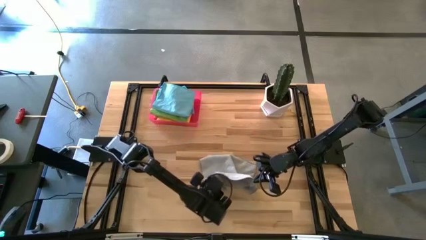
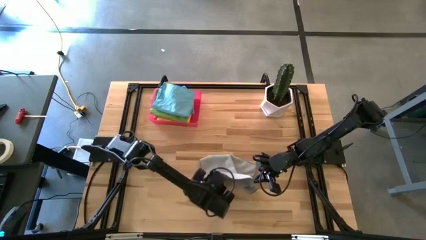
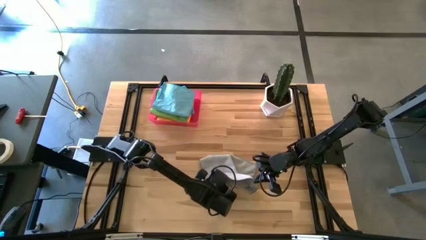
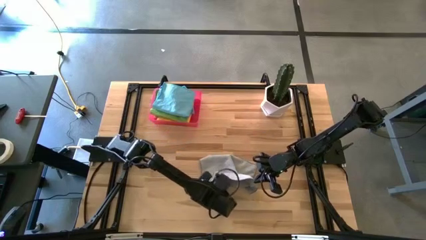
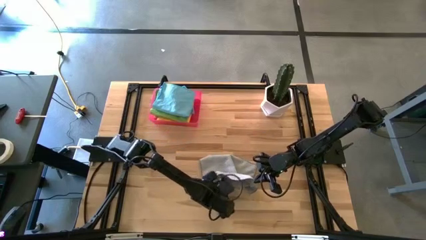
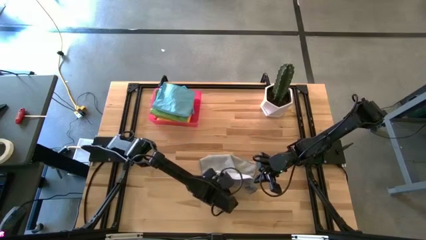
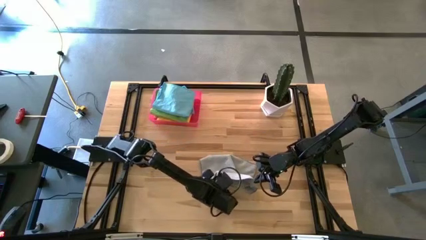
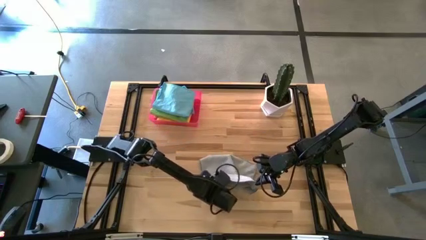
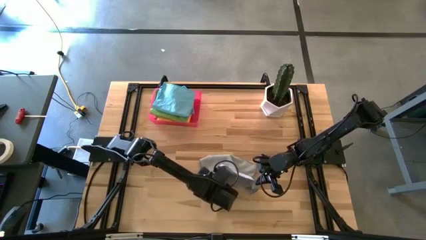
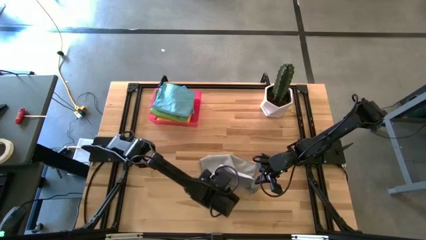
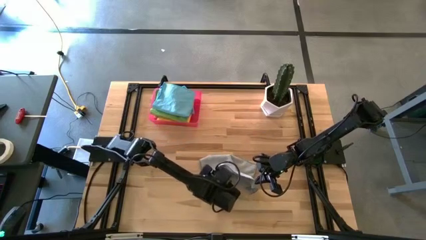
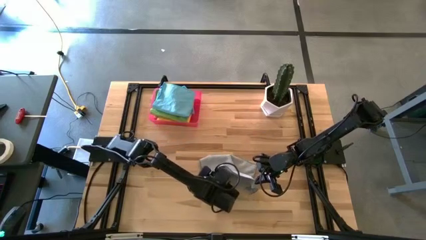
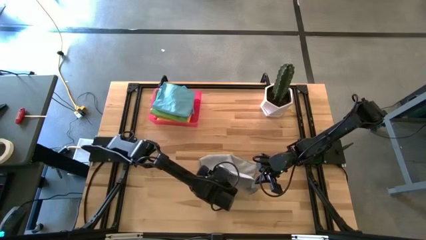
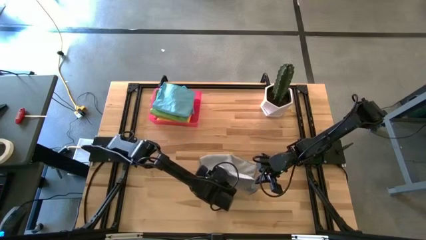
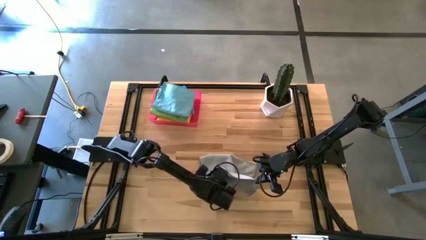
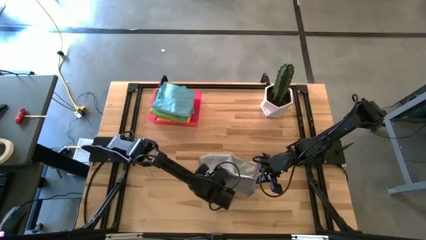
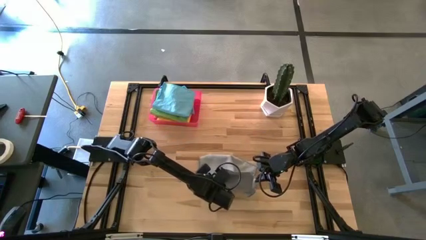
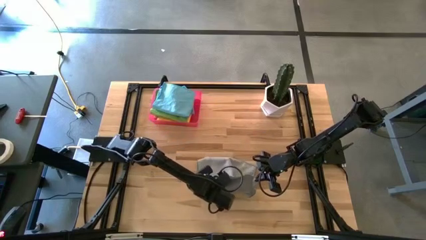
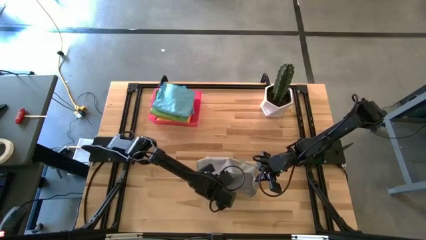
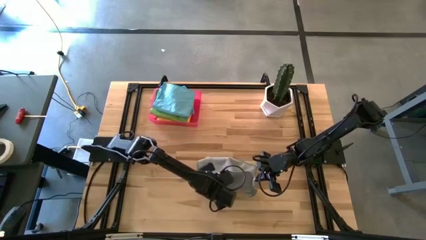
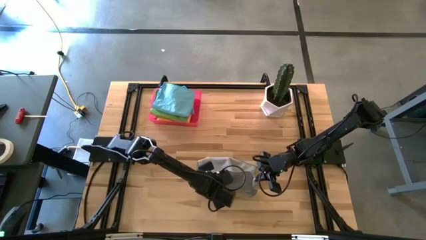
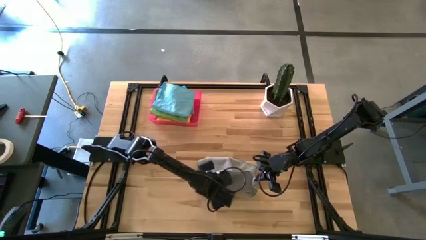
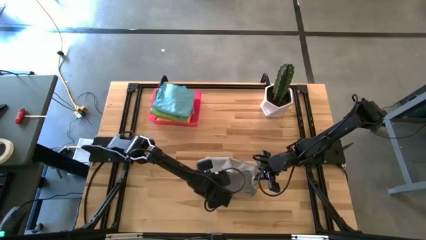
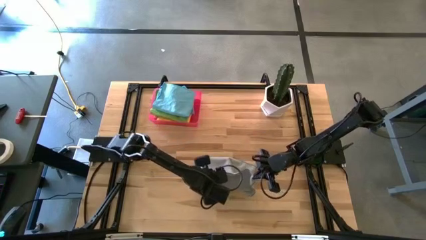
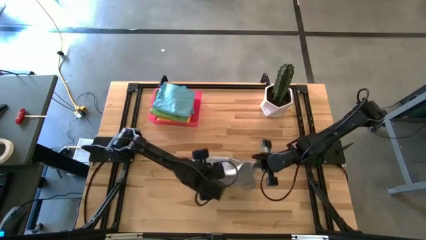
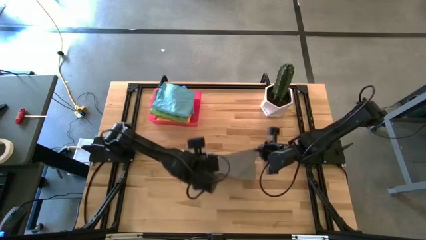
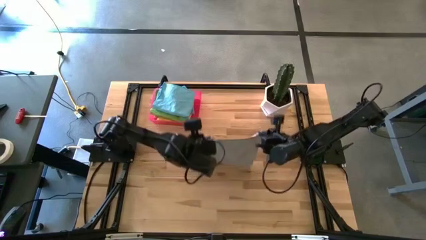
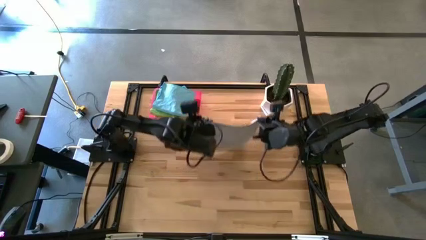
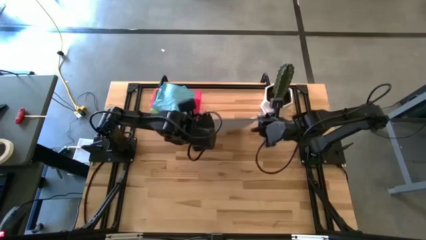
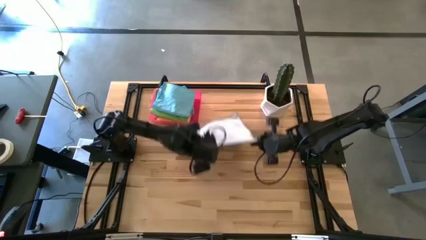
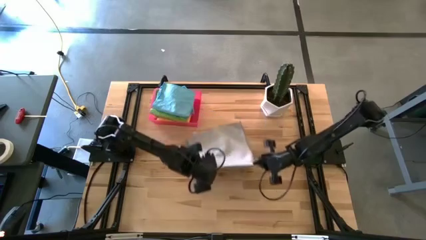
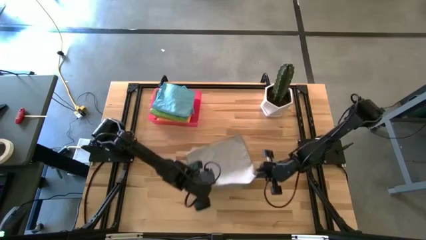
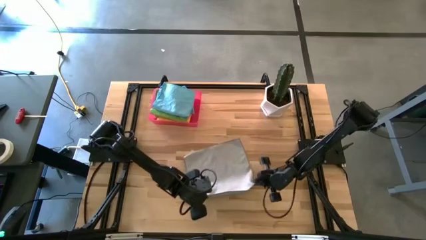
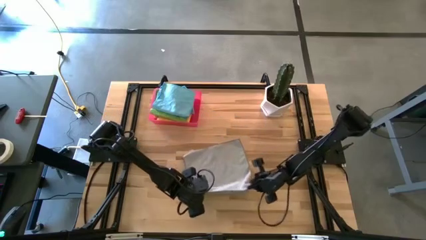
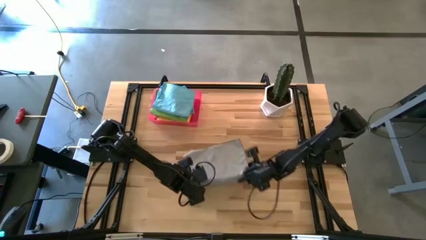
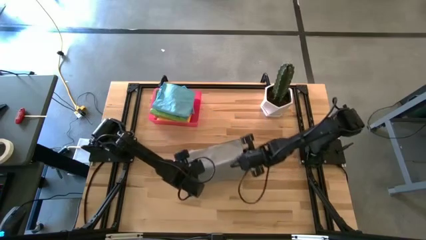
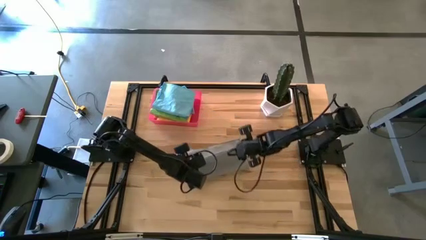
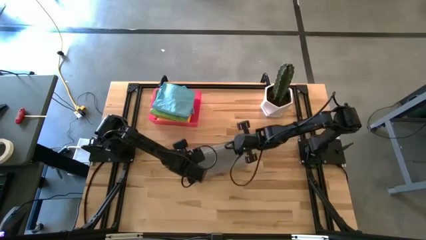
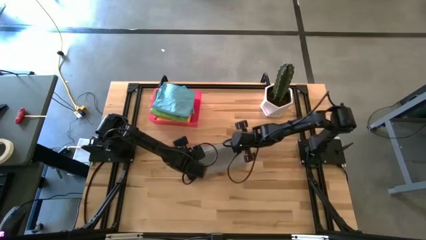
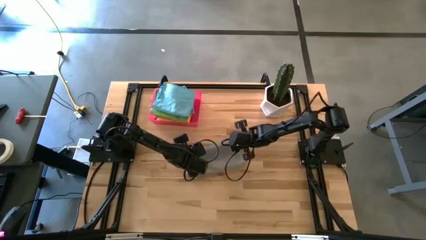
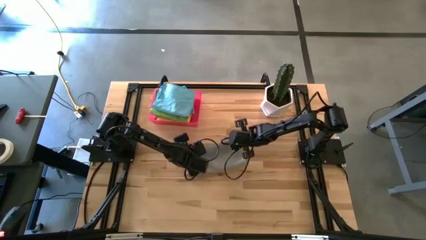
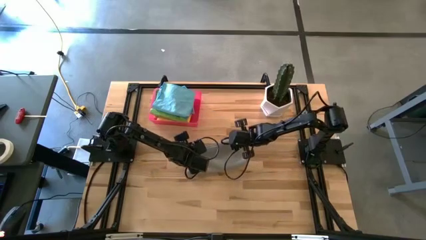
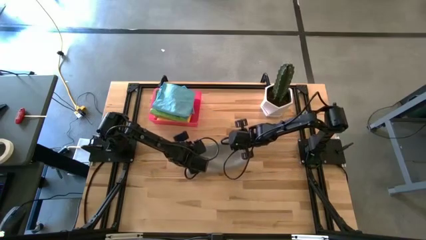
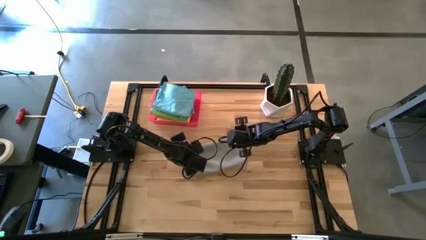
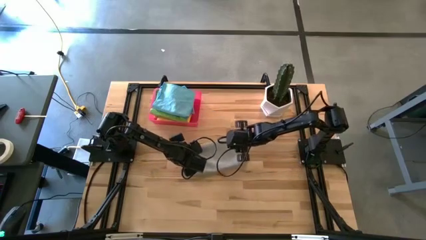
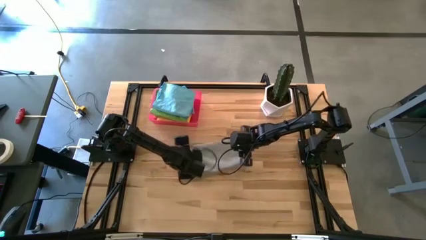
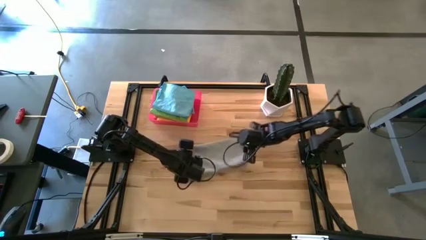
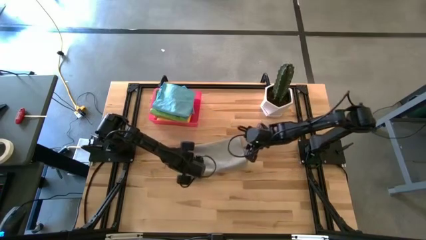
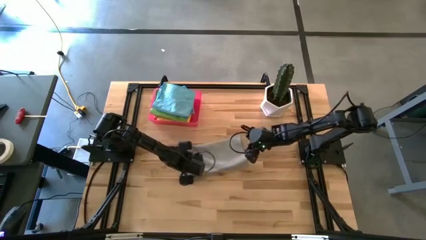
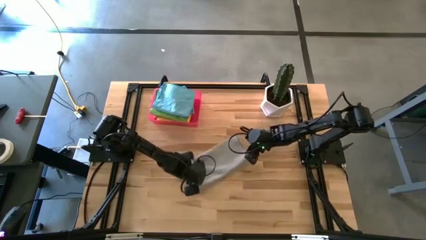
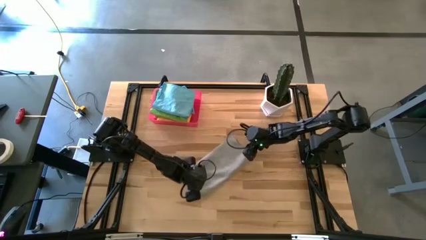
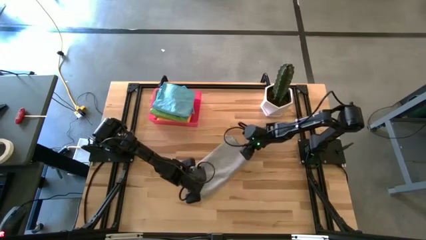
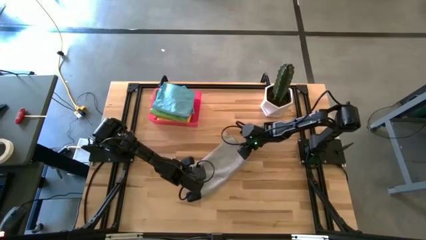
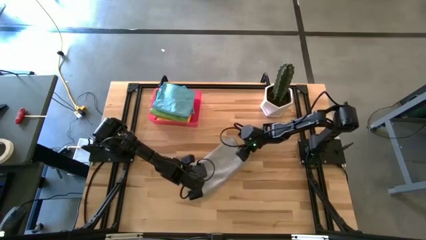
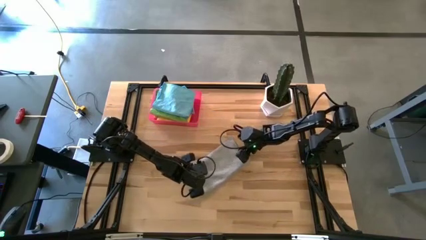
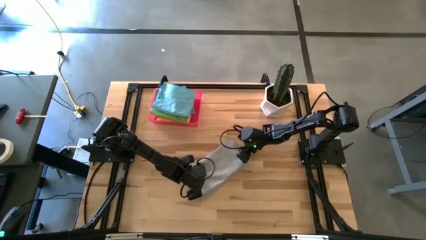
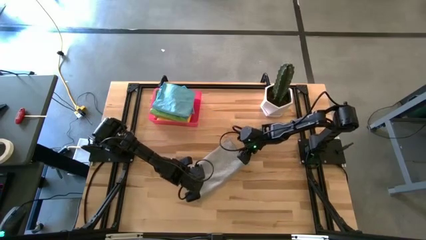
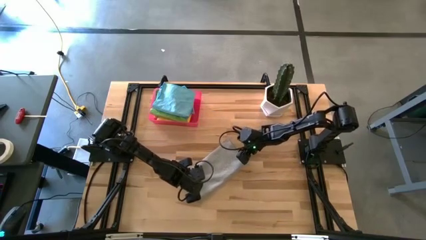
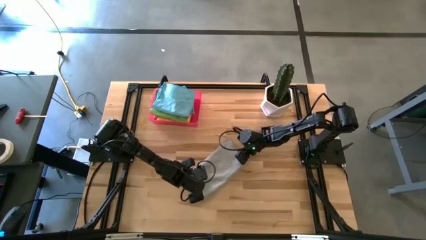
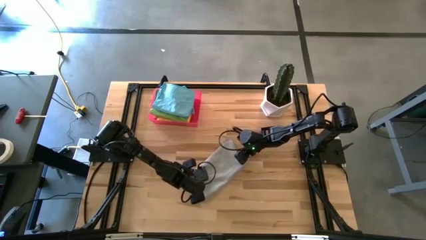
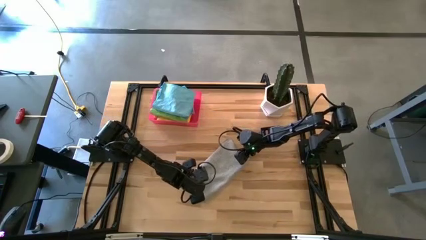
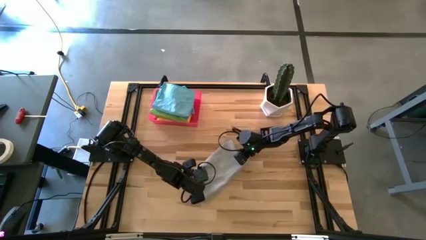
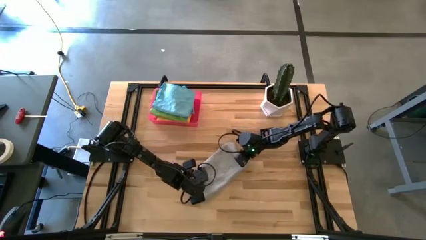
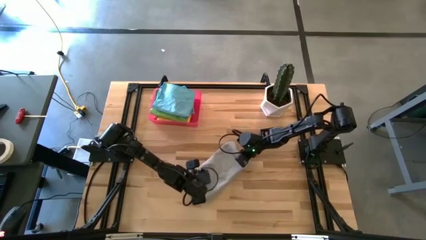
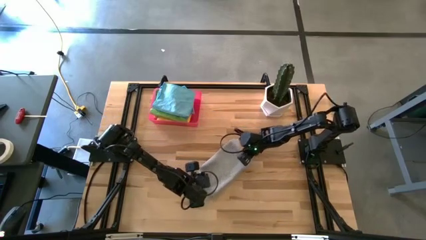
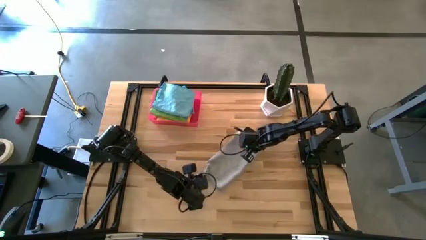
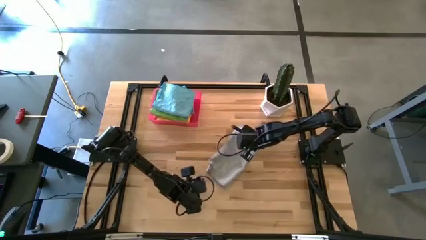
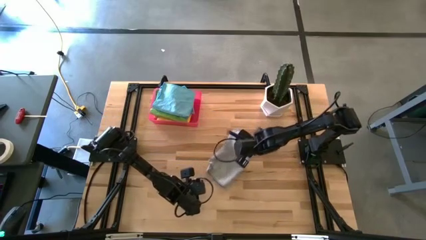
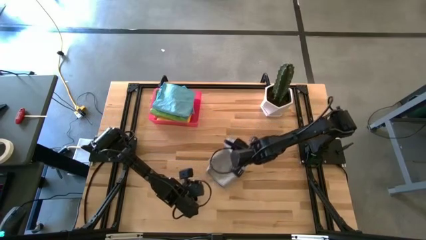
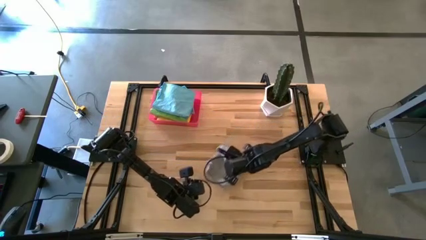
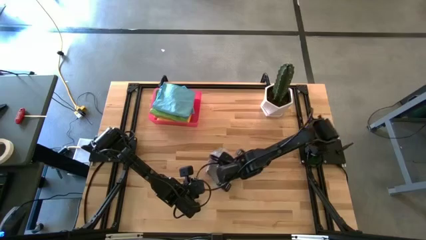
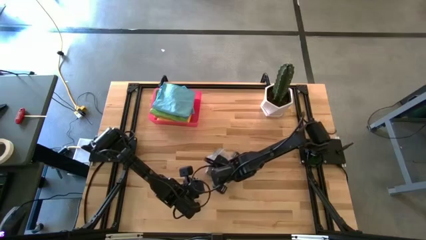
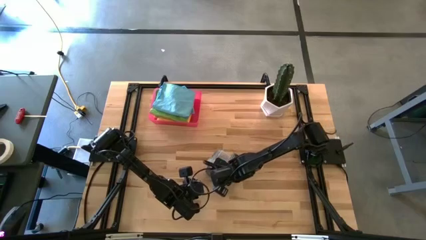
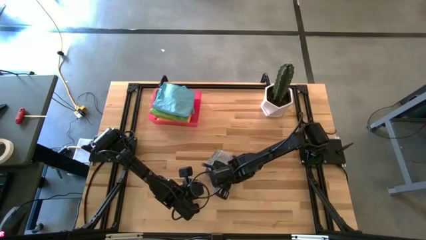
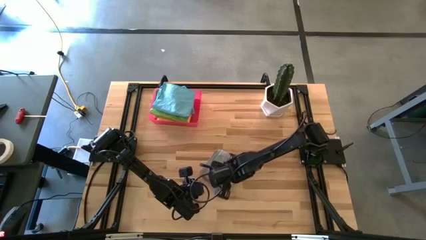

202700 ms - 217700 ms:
Task: Fold microfiber towels
Fold the gray towel on the table
